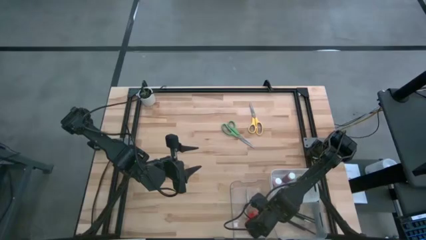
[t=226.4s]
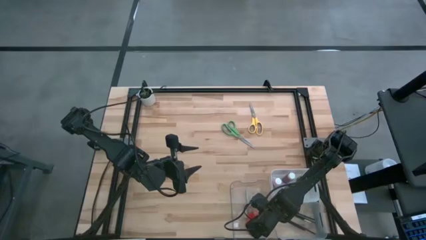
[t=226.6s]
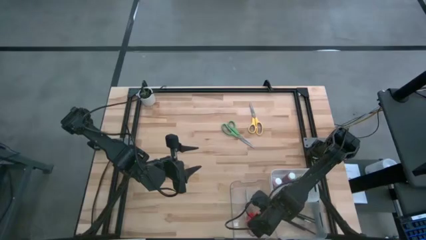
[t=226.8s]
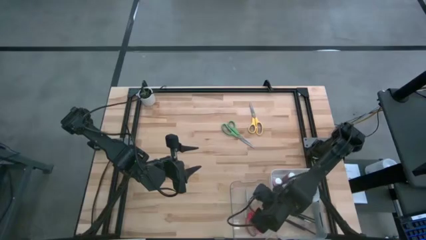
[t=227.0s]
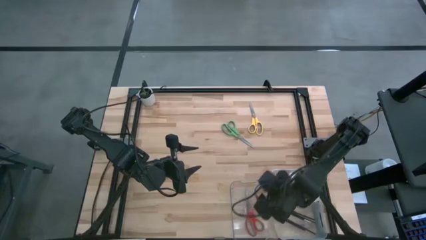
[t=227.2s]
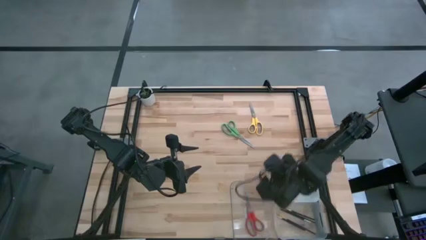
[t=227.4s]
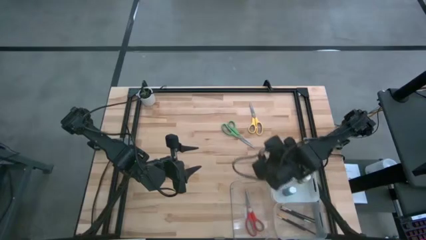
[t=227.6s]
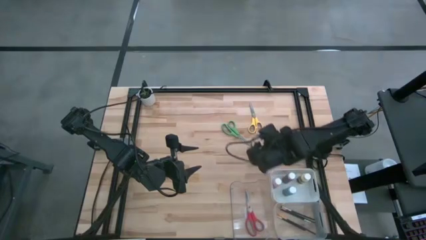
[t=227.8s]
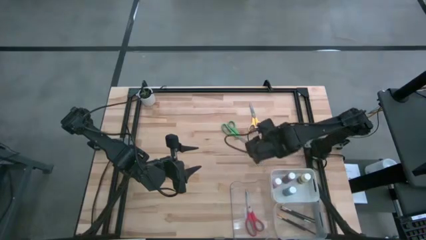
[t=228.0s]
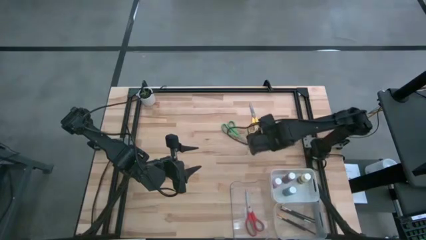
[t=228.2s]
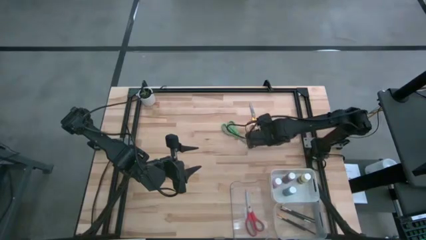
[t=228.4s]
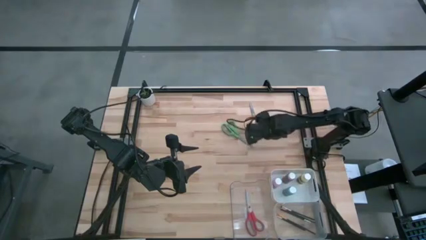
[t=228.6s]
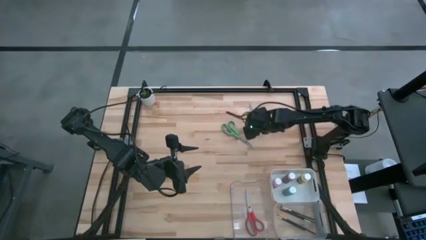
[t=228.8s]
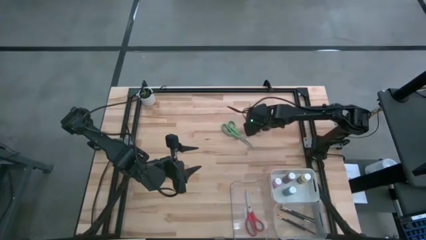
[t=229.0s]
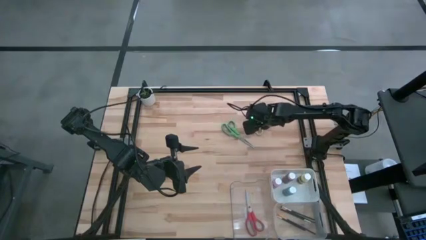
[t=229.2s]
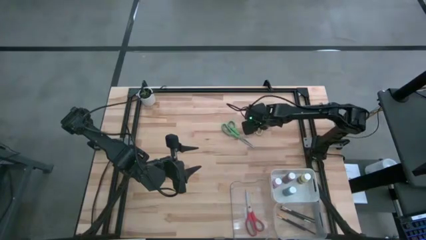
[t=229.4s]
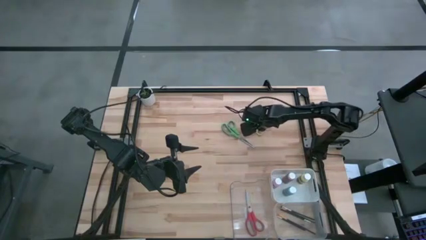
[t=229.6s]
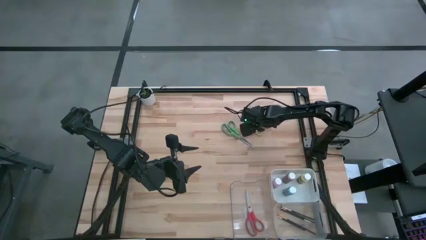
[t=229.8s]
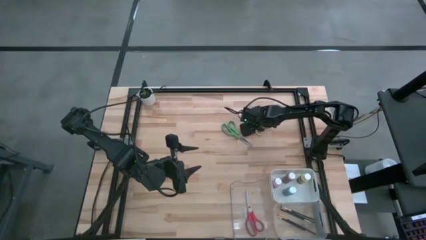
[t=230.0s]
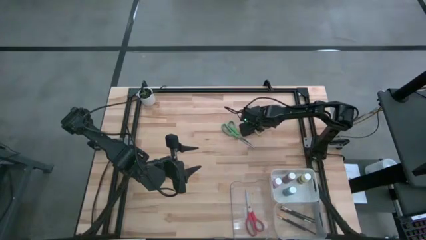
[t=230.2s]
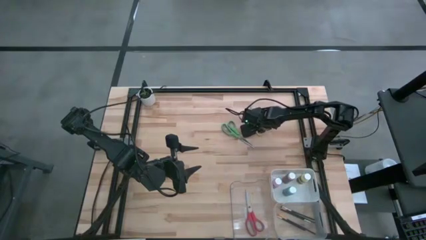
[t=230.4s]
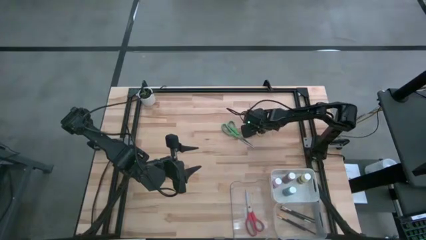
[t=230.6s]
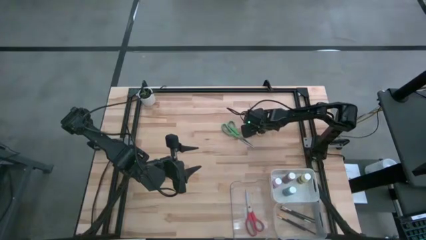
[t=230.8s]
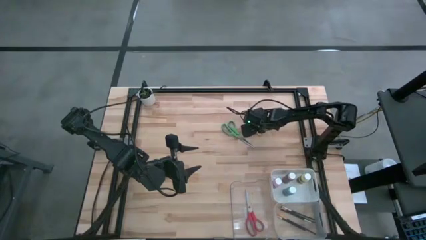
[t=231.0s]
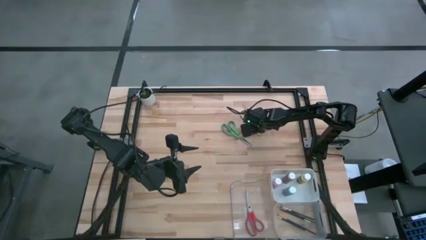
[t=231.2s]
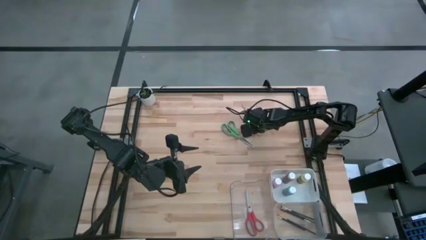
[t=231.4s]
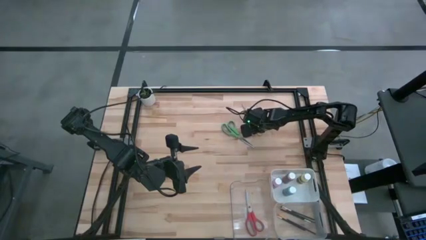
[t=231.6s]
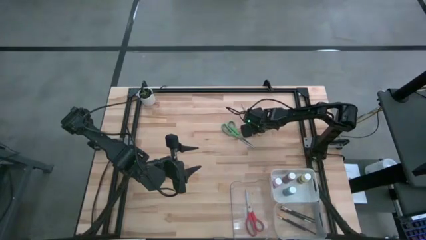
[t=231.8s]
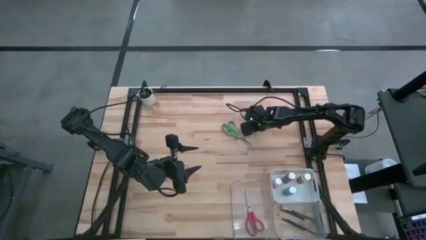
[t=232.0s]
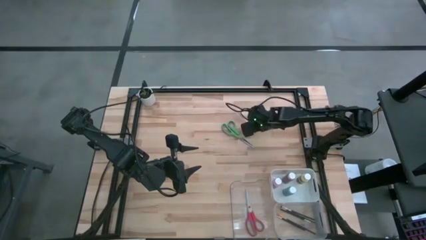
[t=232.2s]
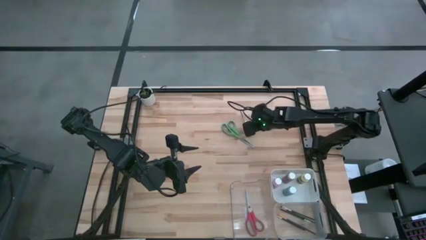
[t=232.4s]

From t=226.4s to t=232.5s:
Task: Pick & Place Paint Supplies
Put the yellow scissors into the left transparent bin

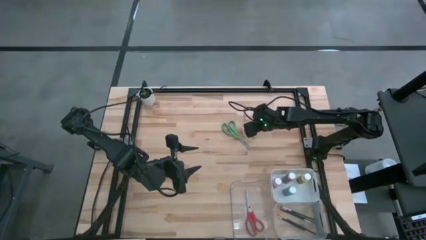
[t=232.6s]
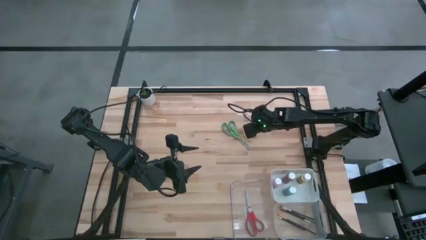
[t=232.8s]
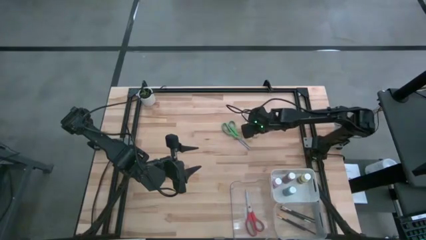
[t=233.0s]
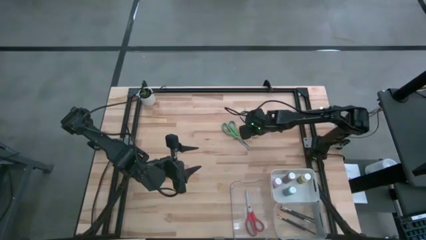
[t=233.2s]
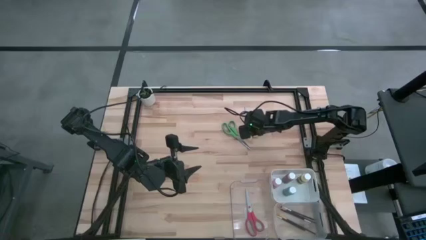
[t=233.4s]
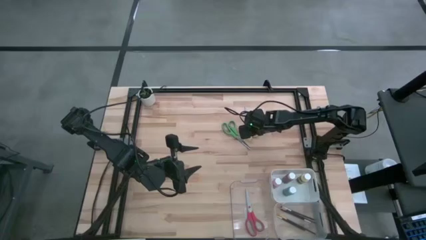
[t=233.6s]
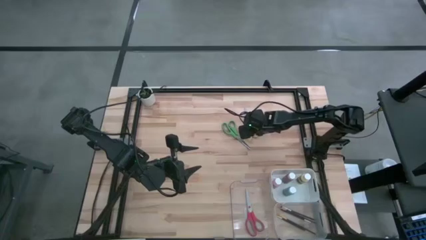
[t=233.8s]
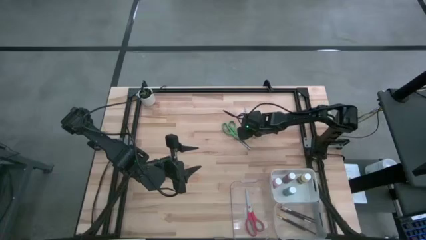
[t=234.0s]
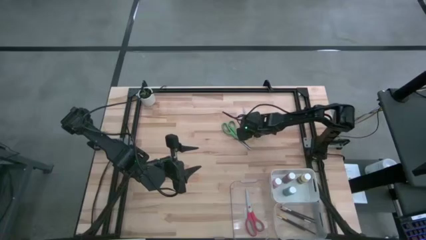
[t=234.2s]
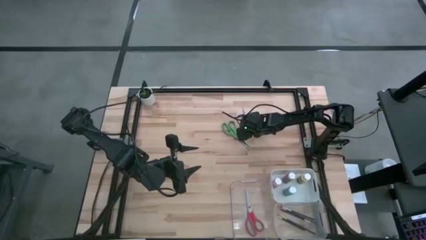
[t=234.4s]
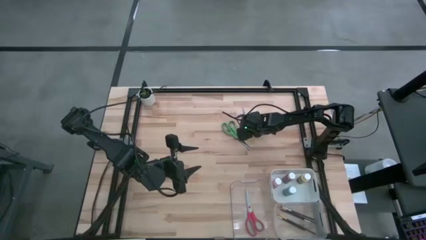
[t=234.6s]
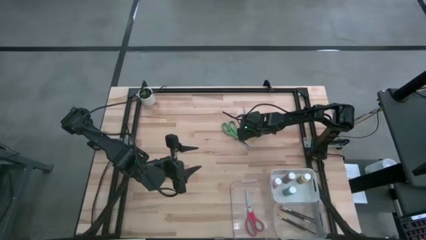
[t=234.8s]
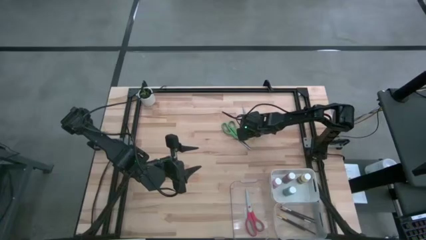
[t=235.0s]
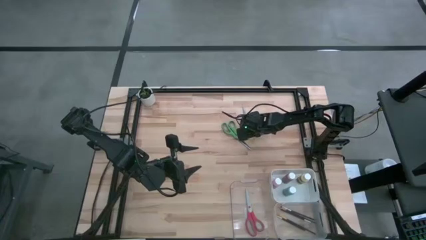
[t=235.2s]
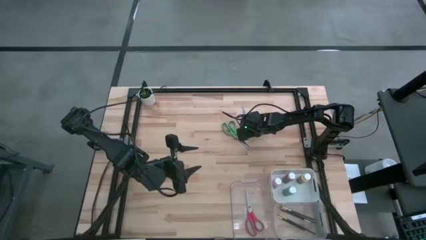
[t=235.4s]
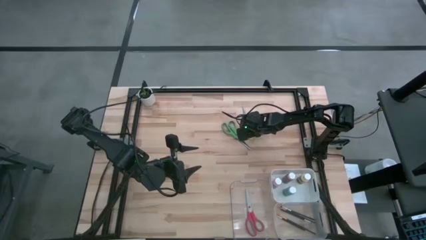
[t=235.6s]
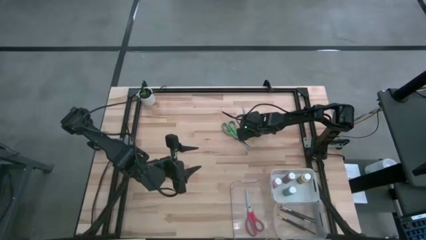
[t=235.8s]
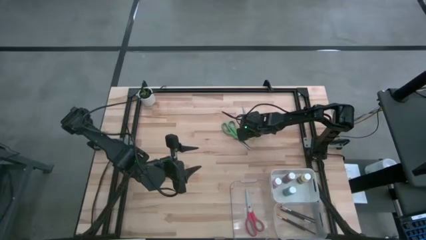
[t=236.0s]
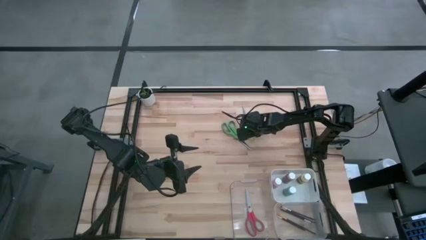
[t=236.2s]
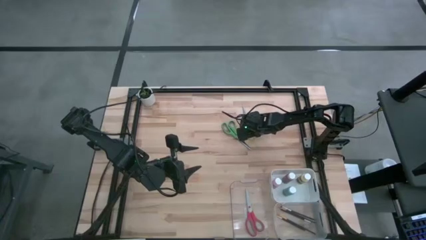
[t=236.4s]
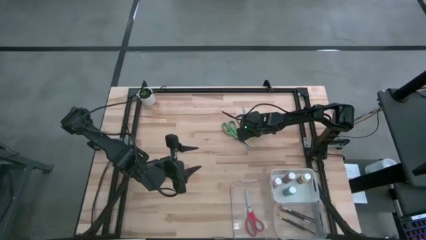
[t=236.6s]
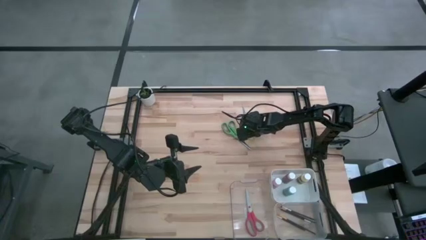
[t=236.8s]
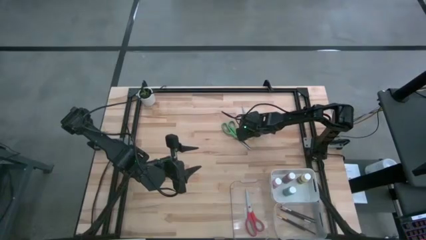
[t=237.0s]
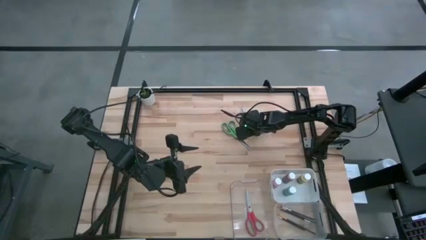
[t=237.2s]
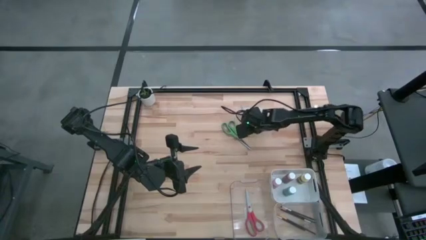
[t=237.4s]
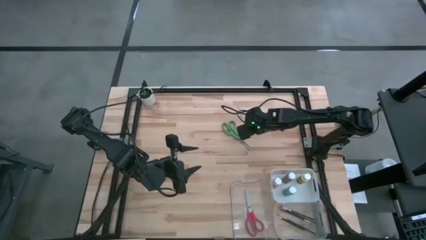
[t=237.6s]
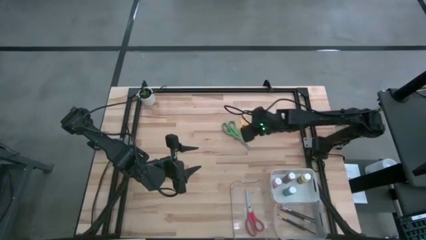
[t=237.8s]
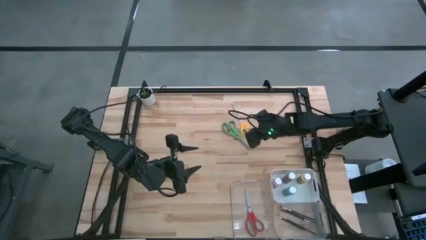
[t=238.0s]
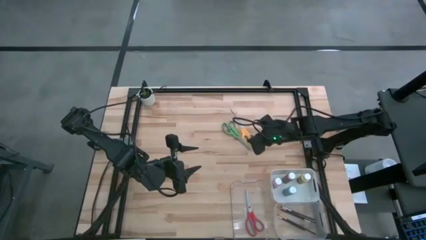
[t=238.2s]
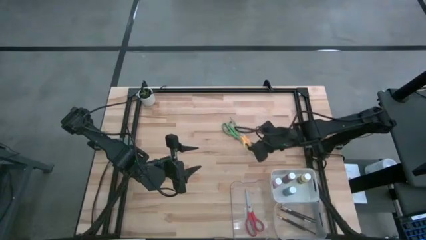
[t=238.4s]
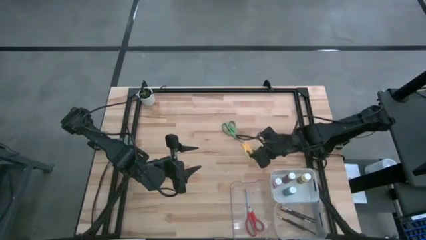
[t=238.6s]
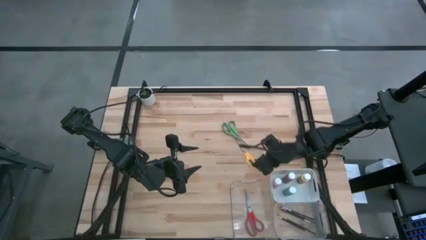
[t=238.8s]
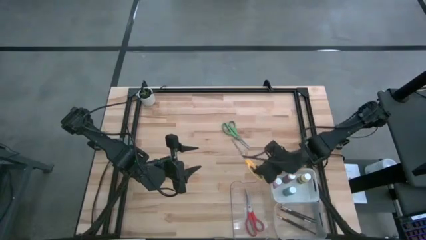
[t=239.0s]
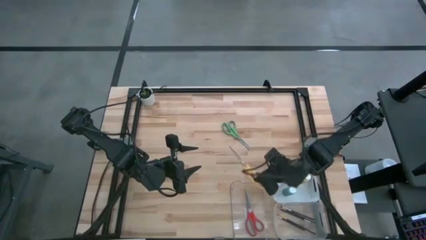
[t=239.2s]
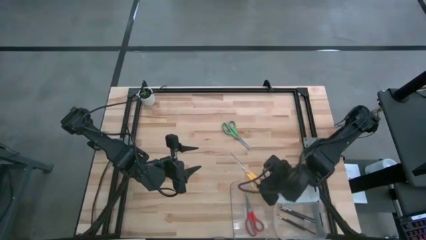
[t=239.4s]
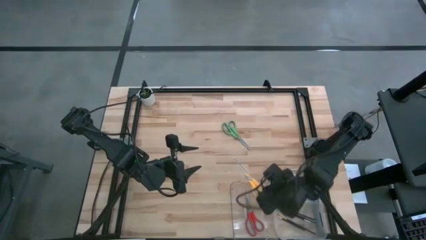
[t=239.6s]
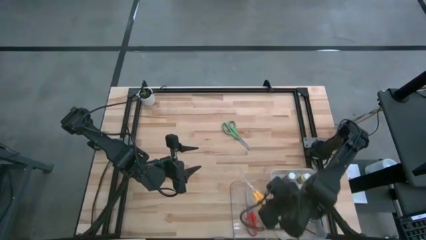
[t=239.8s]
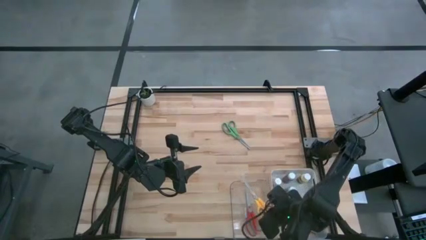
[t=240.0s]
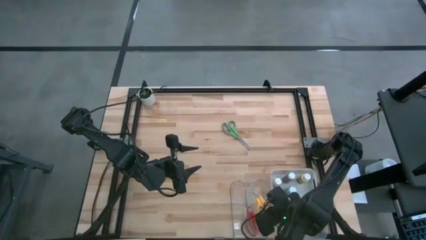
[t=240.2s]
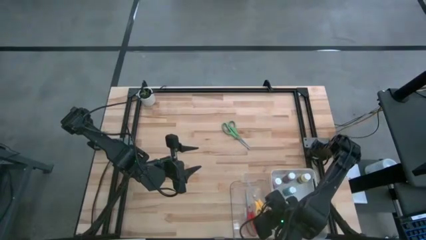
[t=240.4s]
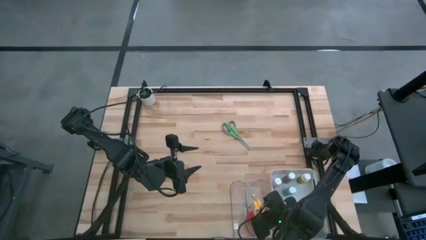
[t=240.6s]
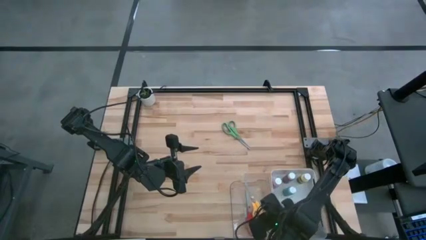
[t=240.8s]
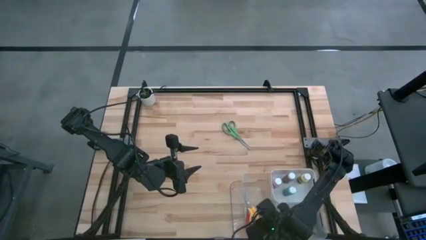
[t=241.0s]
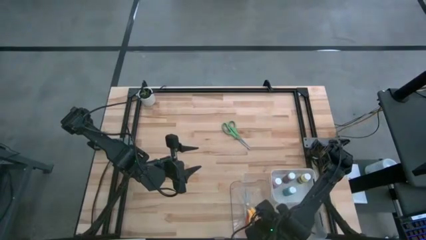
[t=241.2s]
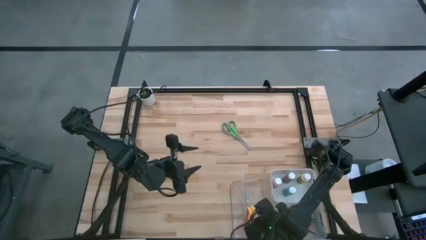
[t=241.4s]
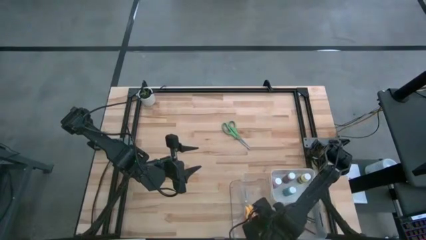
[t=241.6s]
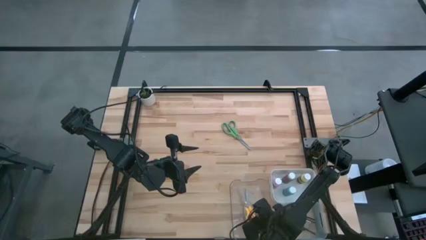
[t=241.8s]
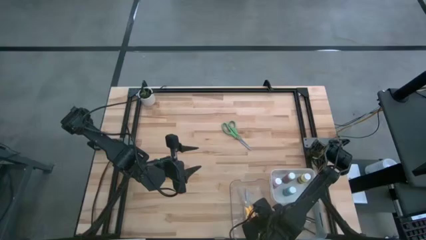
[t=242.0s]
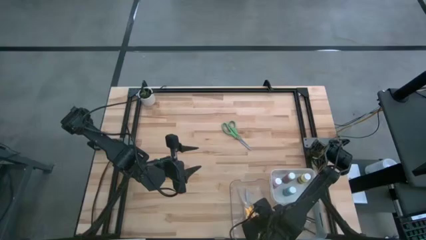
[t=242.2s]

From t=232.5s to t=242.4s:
Put the yellow scissors into the left transparent bin
